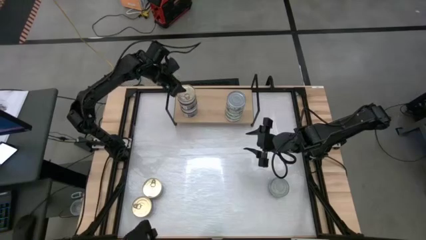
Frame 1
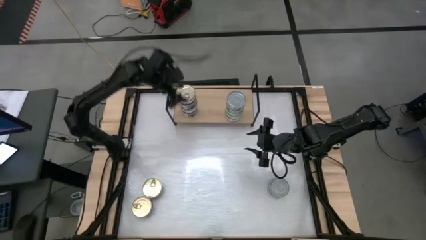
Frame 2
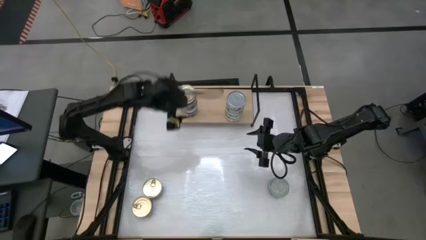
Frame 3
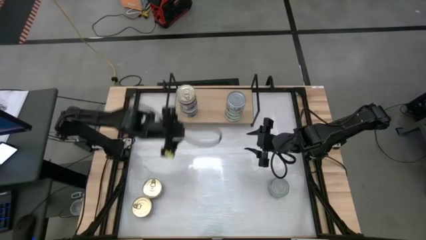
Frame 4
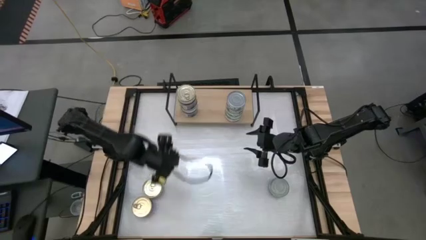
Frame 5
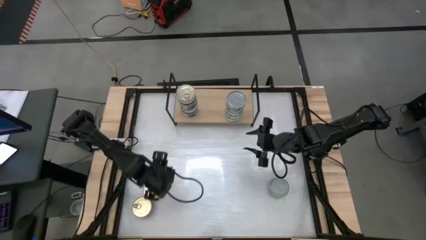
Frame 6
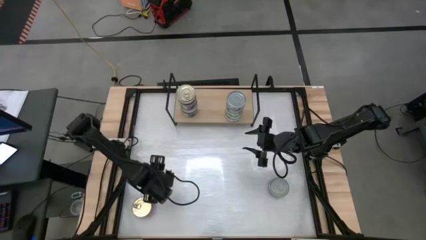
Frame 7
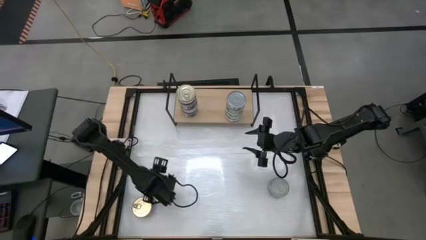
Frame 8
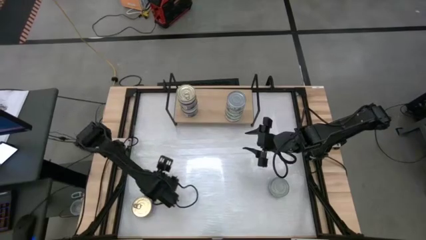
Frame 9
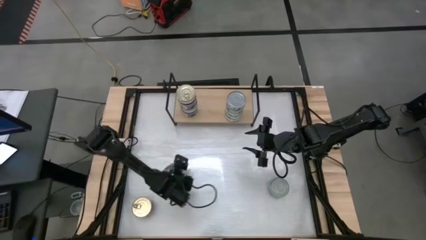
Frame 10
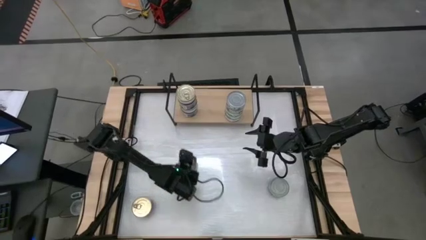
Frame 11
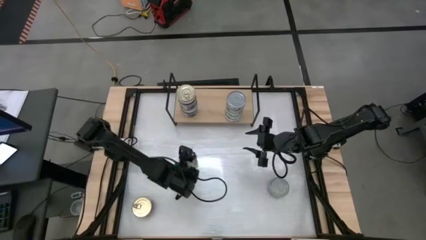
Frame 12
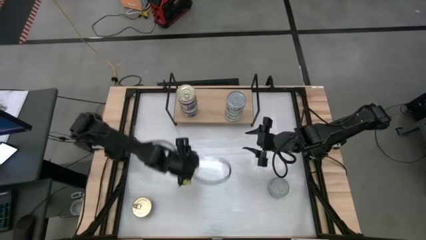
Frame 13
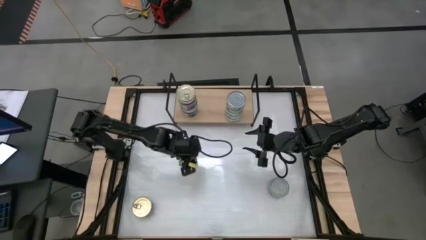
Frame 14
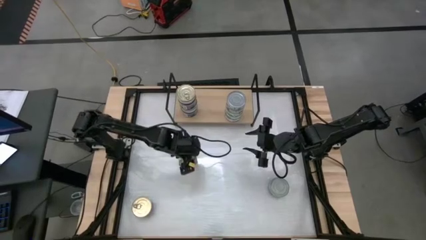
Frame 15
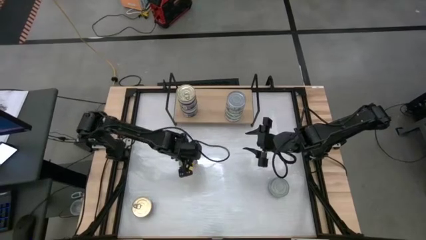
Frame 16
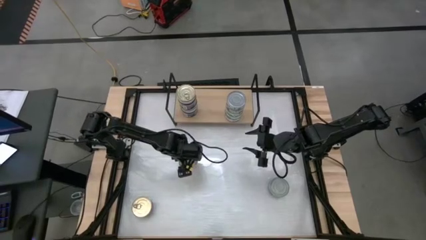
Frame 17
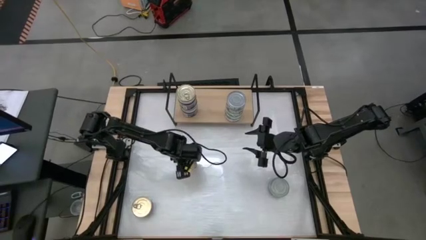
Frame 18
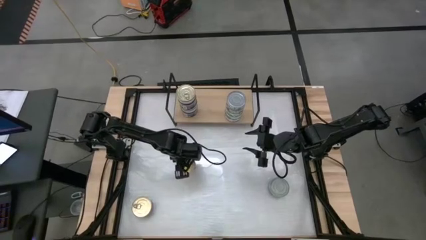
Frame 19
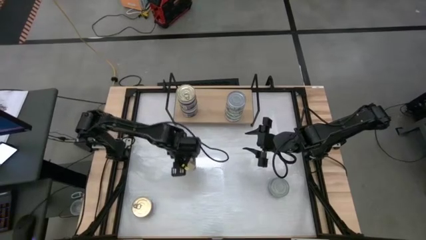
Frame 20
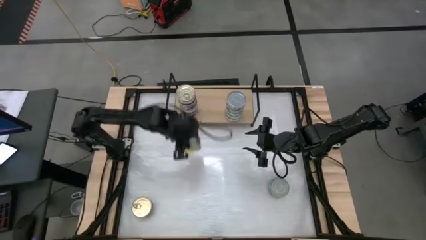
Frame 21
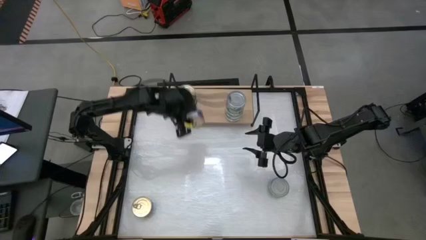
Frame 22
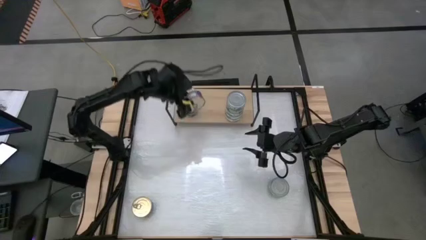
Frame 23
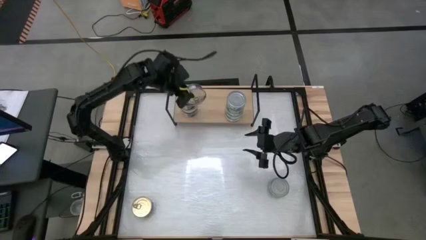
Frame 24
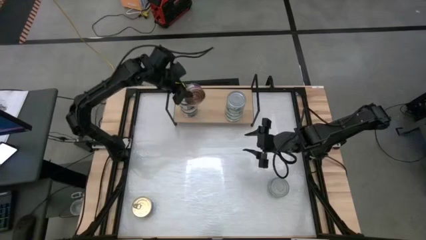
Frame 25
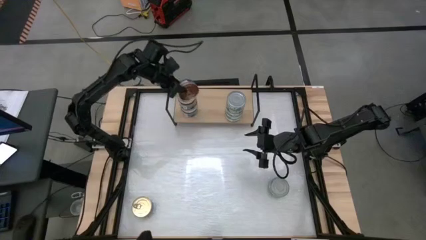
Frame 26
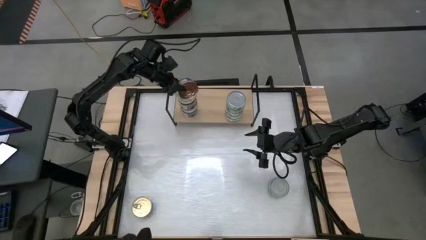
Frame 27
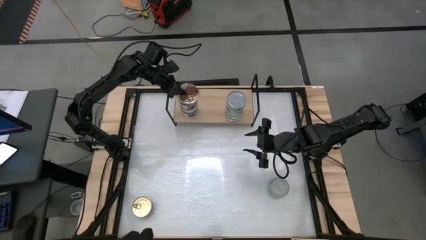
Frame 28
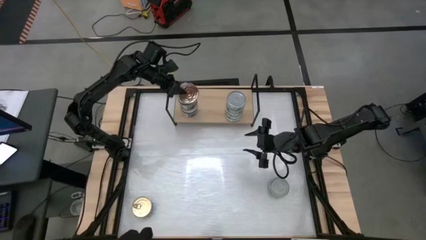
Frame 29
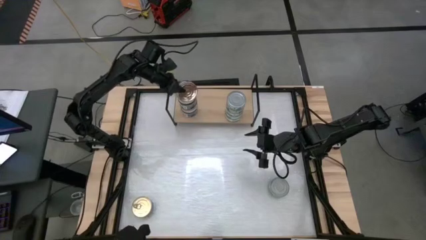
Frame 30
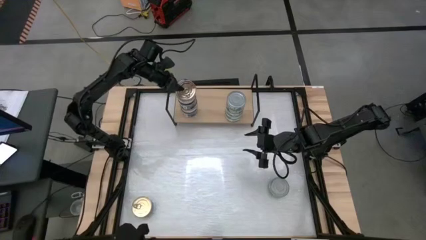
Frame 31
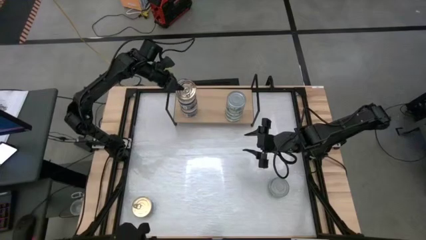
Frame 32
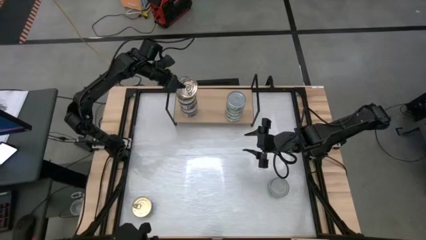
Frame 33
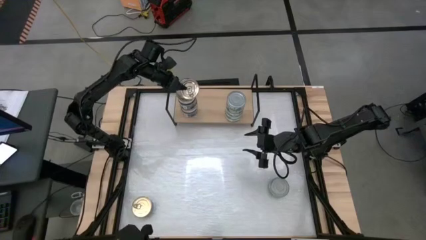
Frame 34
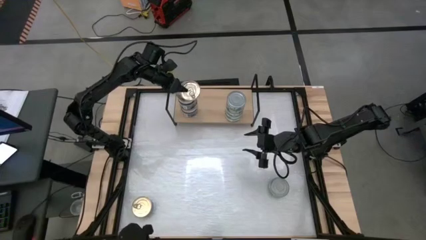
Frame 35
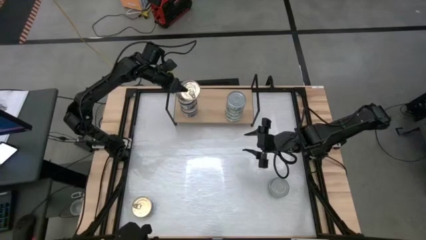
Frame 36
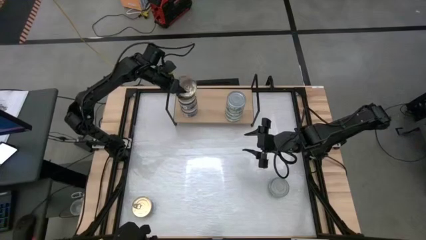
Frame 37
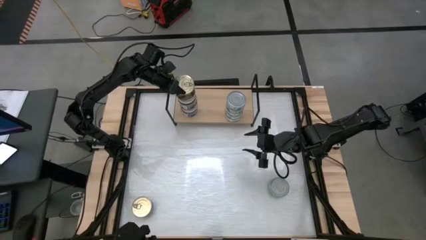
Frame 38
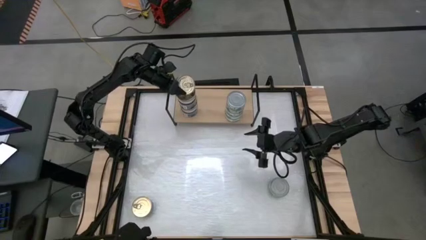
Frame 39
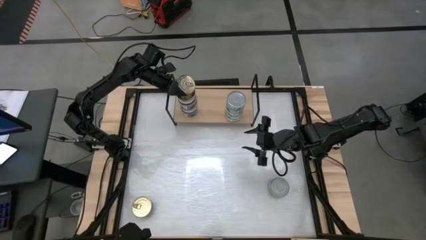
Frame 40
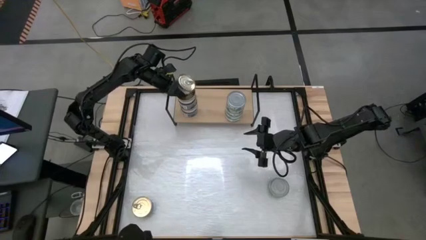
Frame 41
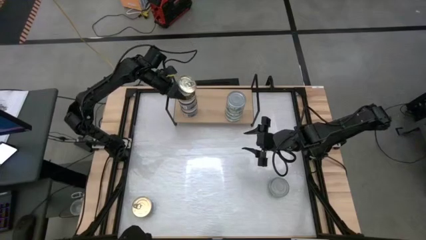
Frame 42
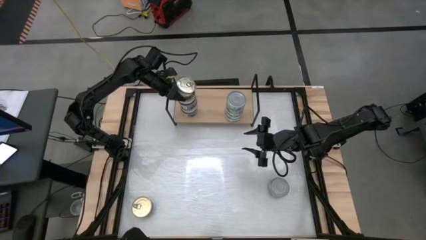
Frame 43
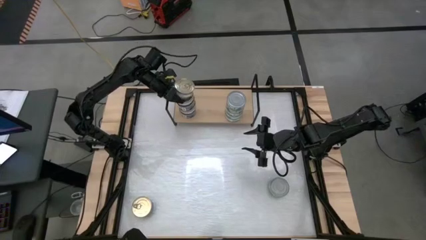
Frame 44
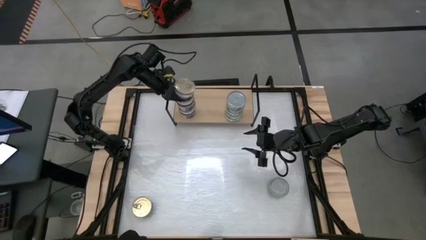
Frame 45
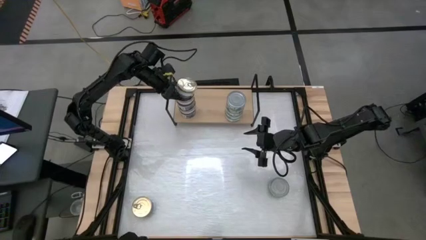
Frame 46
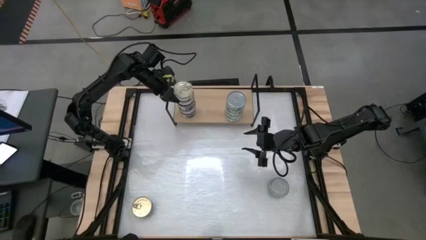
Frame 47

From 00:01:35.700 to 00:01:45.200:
Task: Stack canned seafood by type on shelf
Stack the blue pink tuna can on top of the blue pink tuna can on the shelf

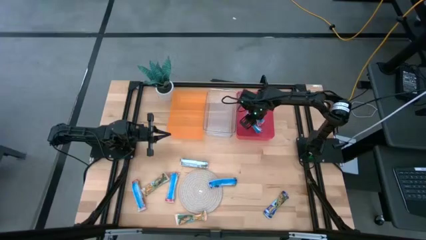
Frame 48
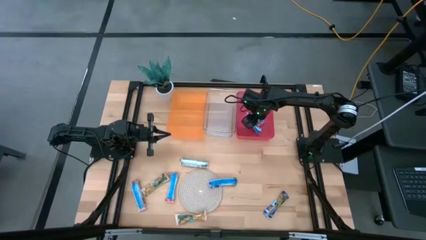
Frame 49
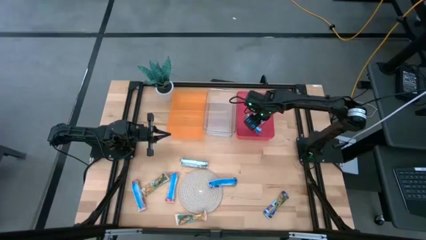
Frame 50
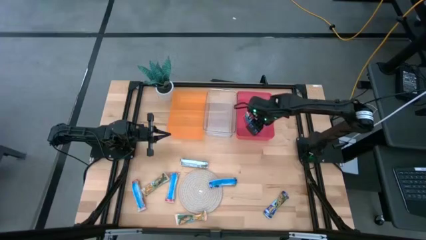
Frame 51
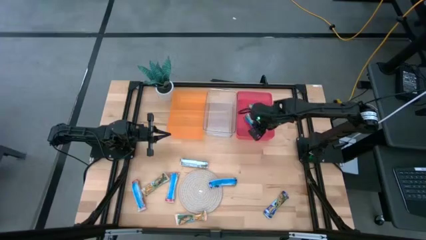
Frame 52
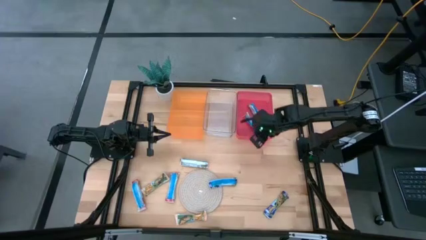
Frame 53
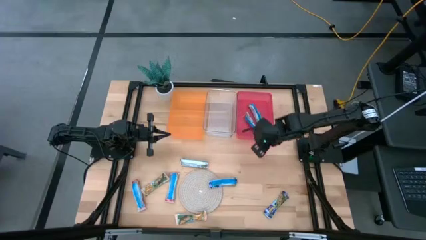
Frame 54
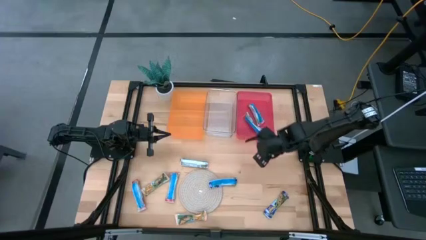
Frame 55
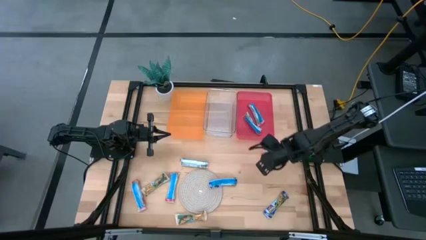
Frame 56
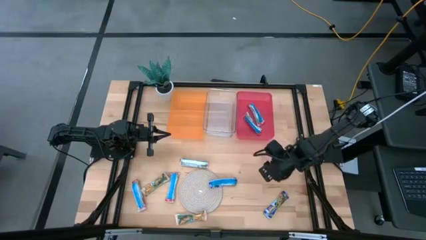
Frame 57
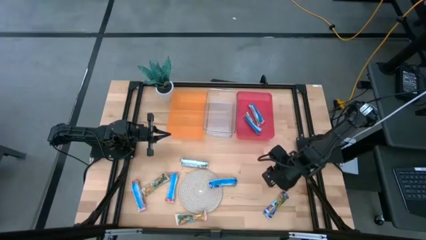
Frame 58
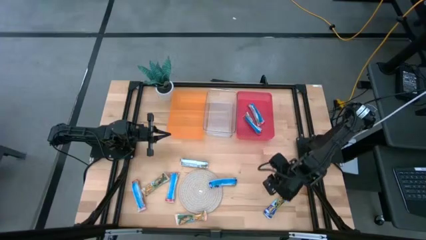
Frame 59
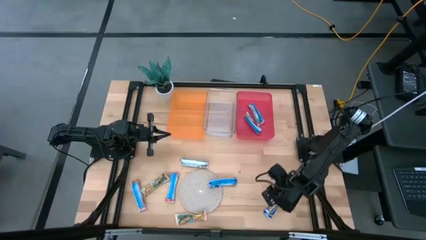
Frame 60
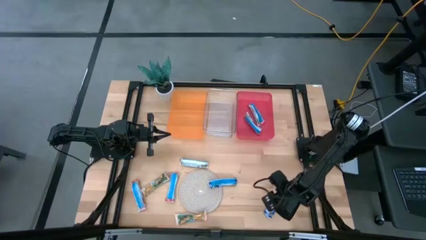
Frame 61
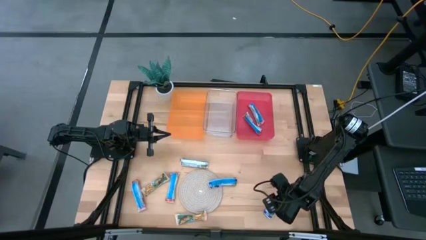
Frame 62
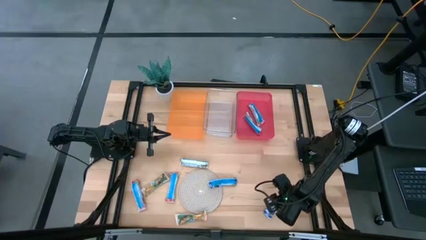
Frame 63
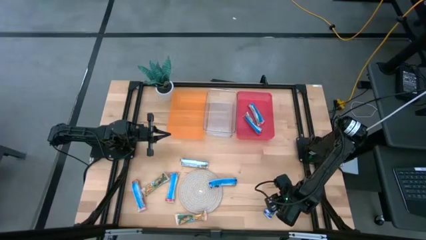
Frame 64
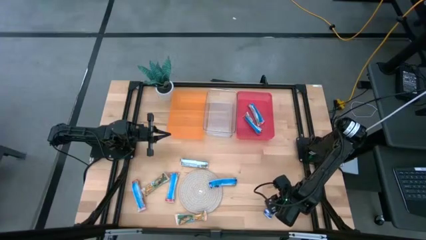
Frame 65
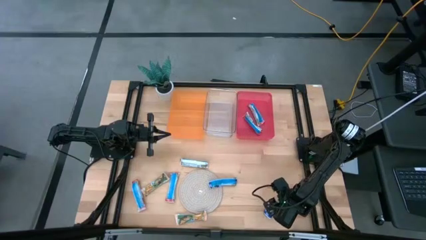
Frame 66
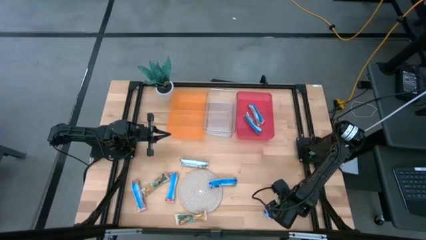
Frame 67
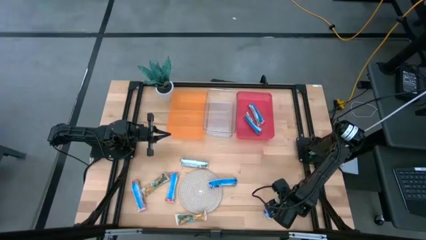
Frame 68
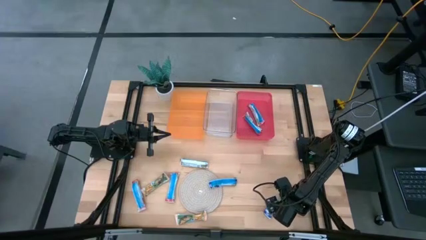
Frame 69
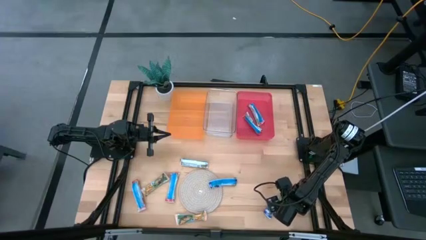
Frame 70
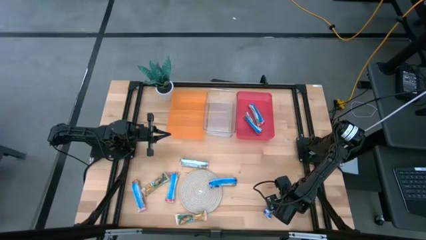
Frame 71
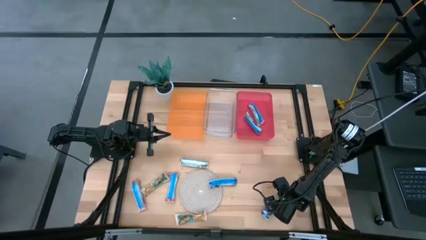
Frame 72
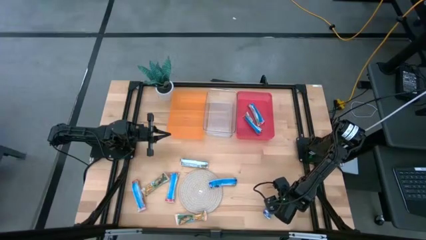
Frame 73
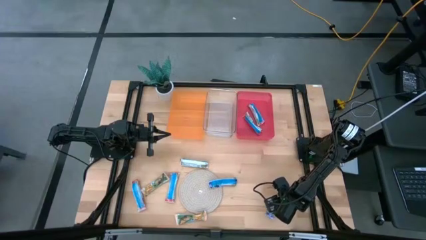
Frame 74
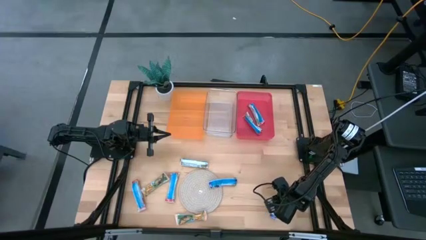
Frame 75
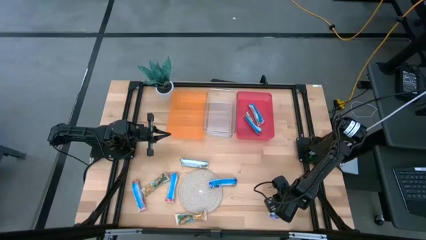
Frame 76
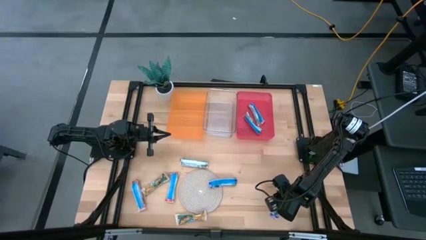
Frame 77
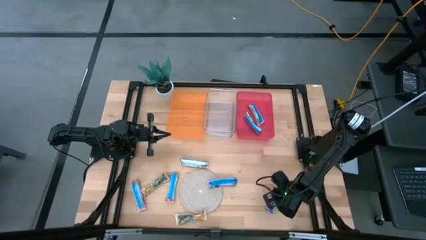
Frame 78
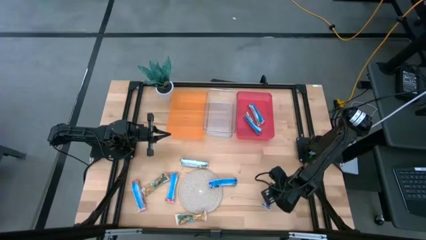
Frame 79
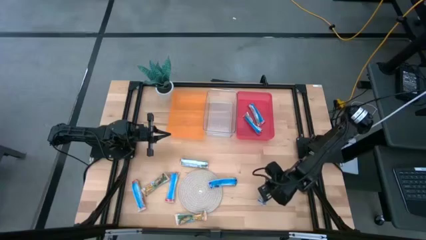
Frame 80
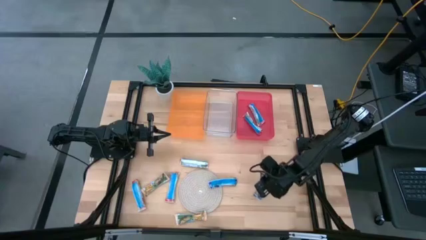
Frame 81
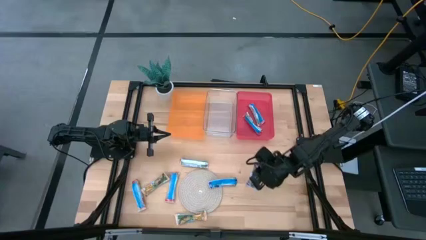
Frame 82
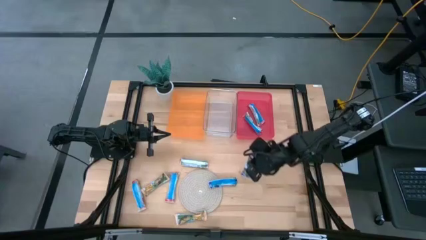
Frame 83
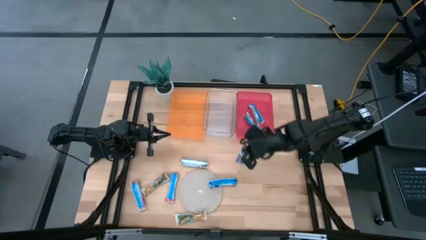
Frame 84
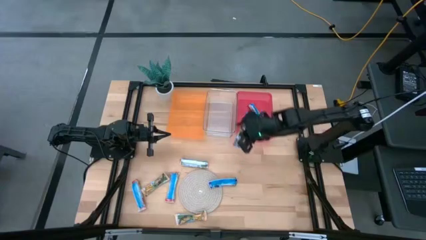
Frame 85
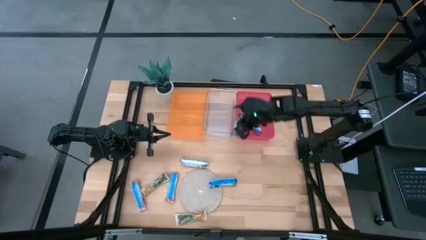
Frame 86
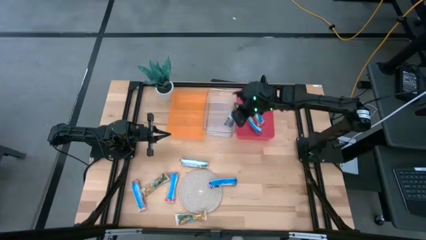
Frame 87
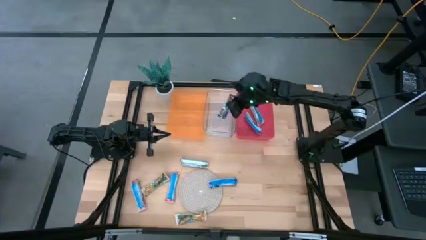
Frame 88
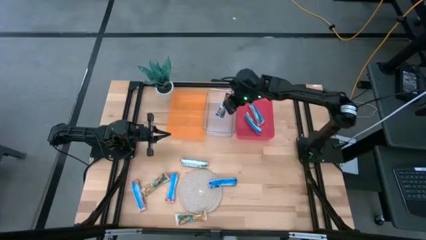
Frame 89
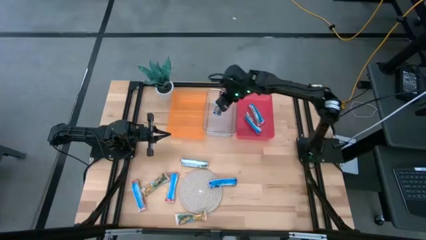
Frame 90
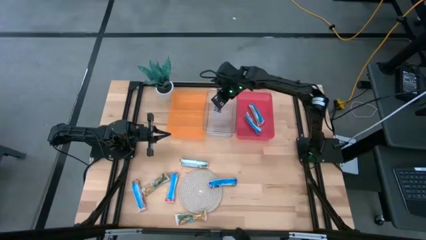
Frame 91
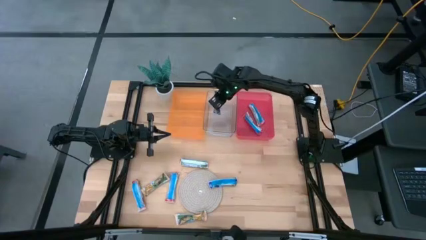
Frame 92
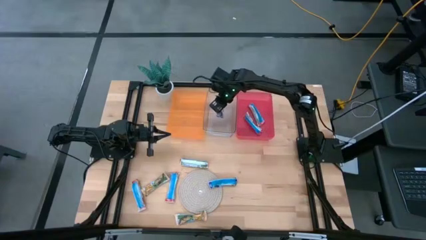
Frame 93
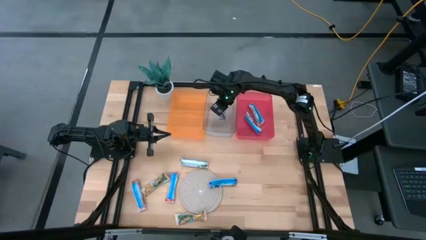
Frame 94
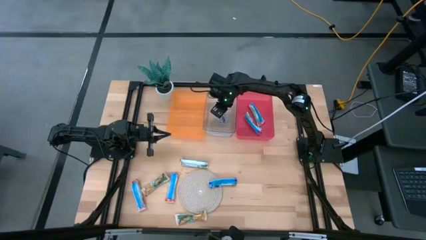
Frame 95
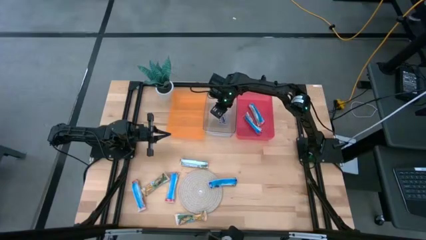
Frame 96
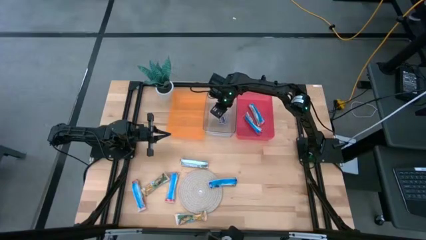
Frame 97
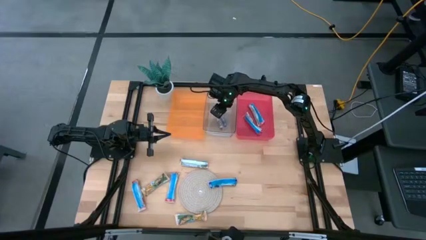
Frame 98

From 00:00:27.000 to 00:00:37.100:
Task: Pick and place Granola Bars by type
Put the bottom blue granola bar into the transparent bin
